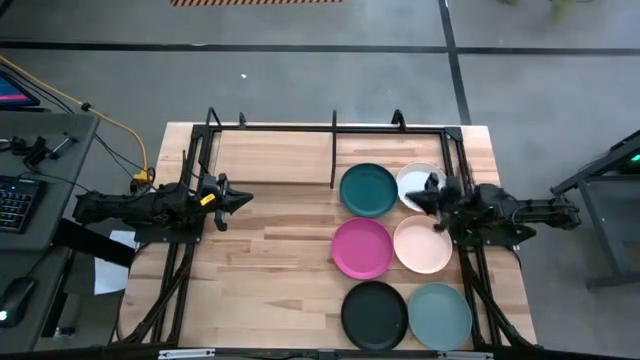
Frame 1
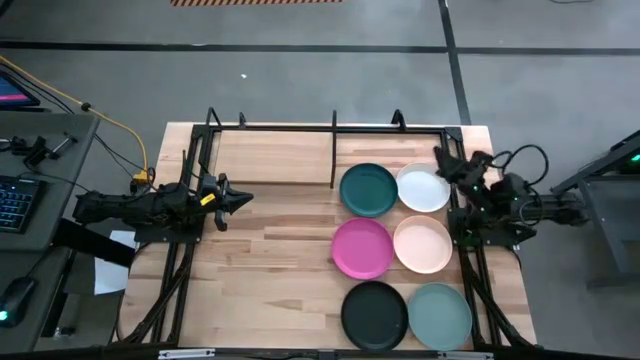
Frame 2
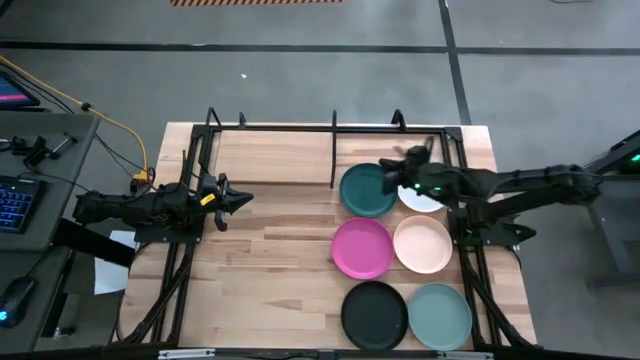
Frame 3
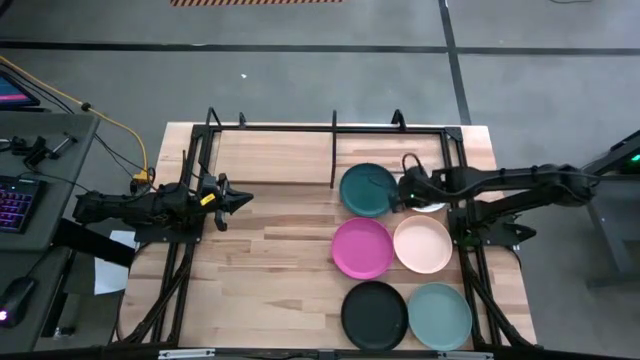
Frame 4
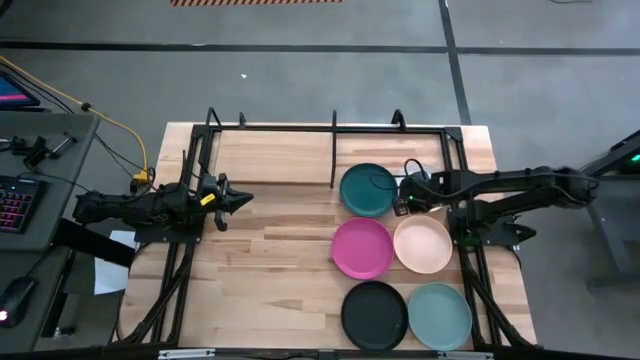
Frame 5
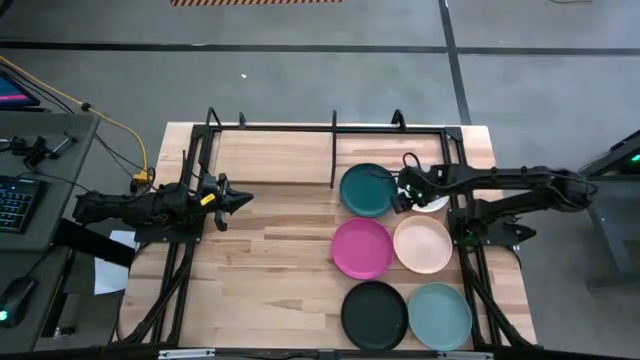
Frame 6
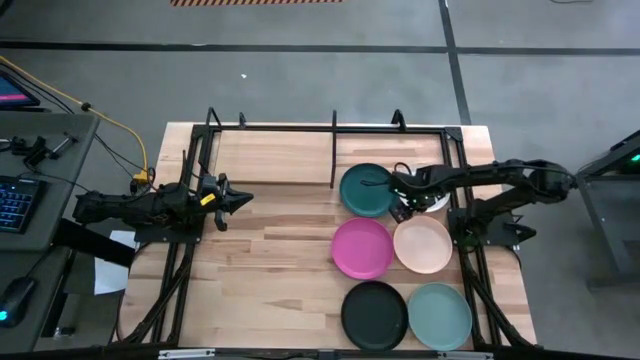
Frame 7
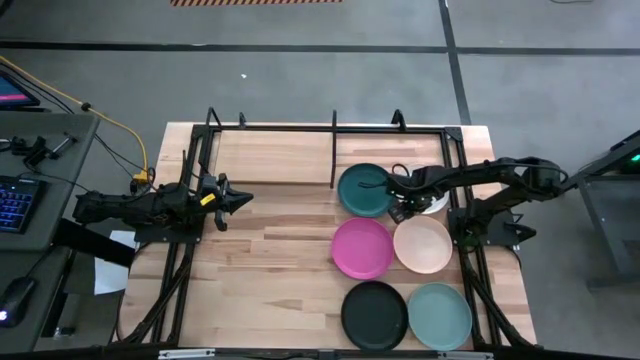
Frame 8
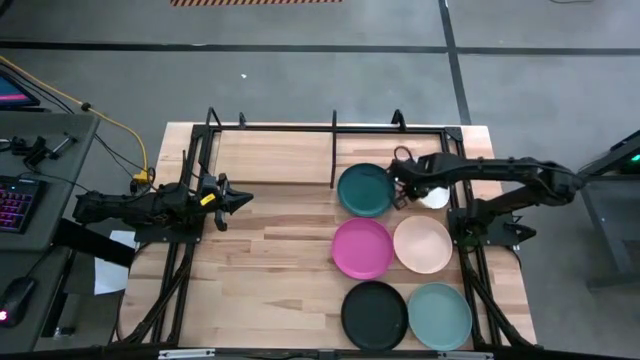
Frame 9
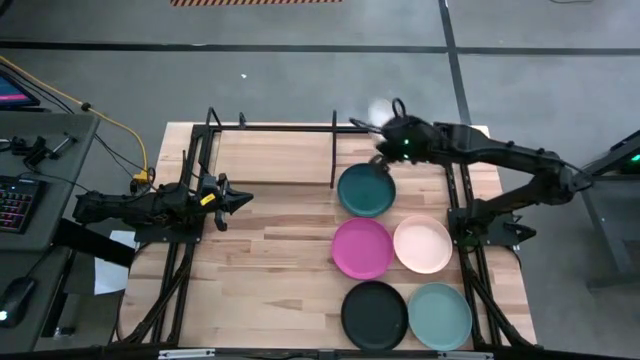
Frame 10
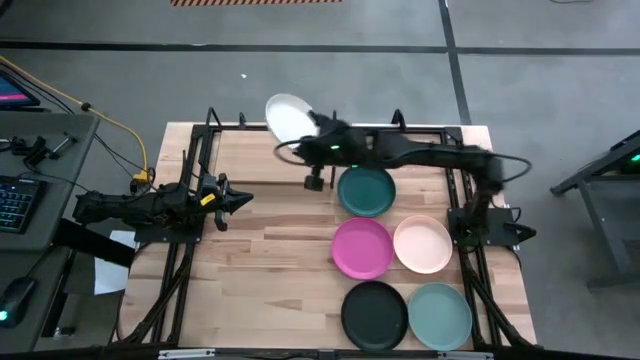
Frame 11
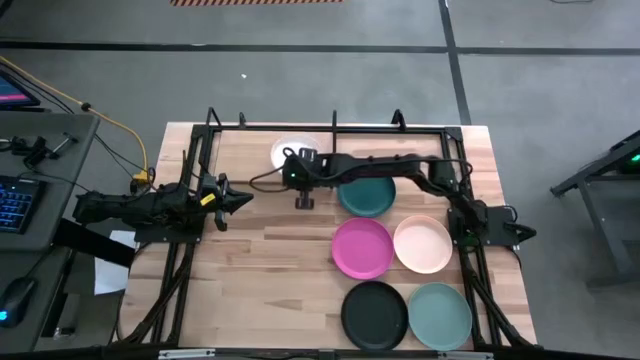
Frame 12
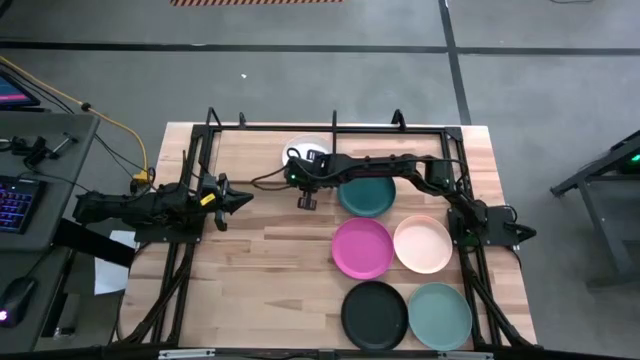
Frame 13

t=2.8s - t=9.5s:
Task: Place and stack plates onto a shelf
Put the white plate on the shelf

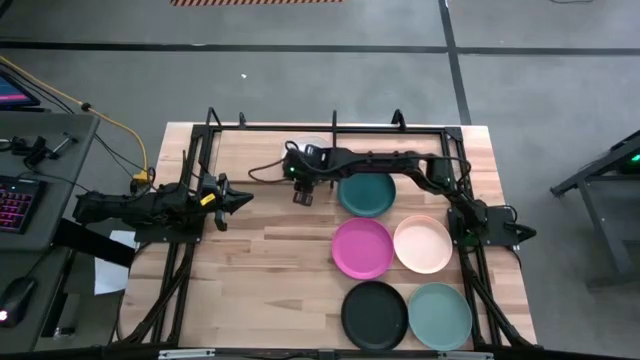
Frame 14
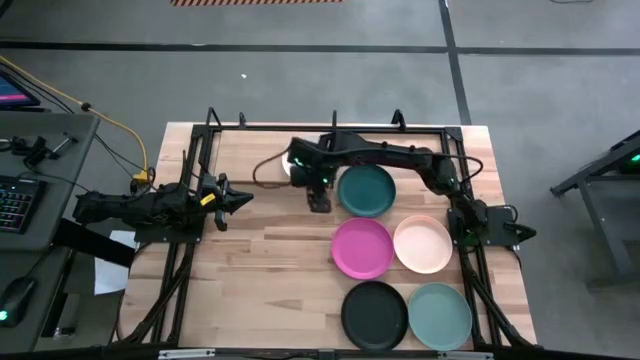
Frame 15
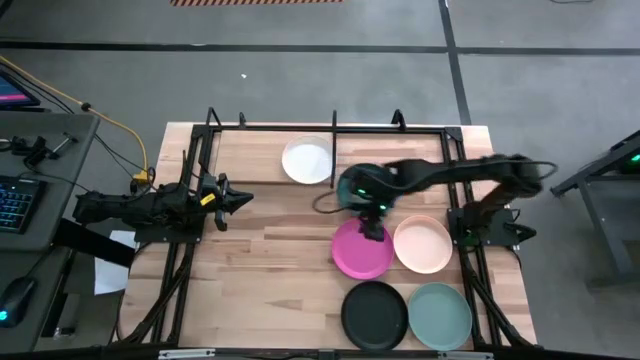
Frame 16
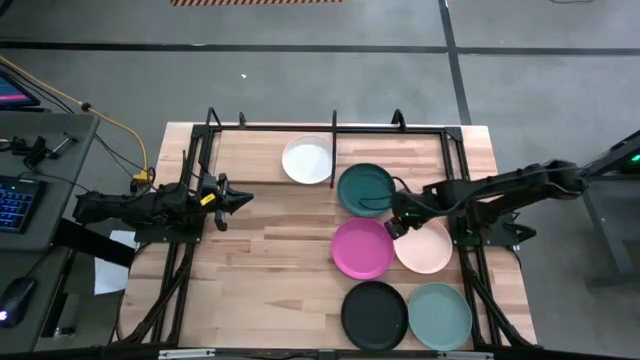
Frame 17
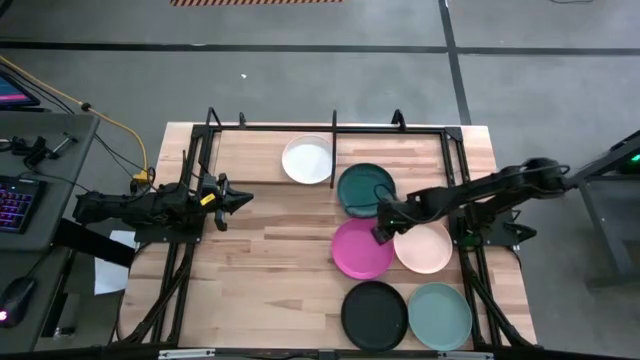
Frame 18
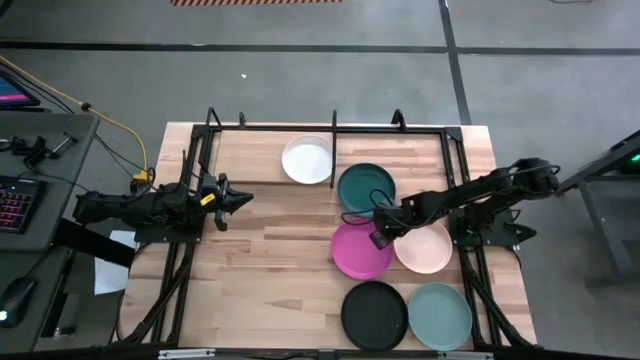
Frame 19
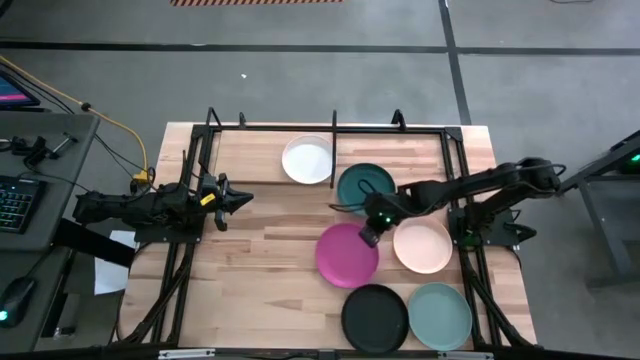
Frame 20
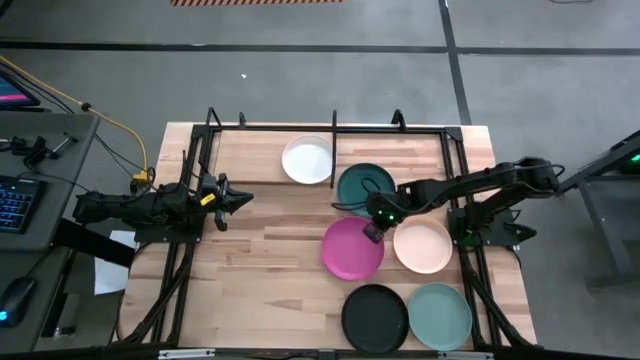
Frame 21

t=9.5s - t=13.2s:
Put the pink plate on the shelf

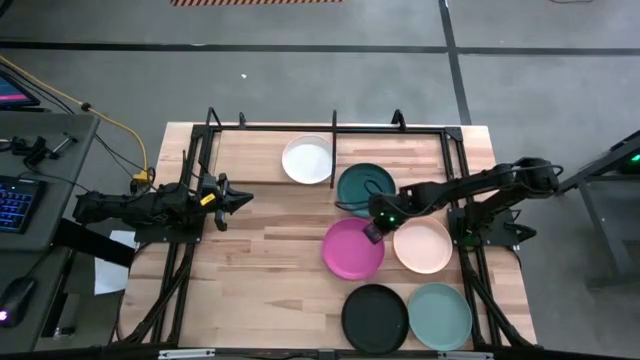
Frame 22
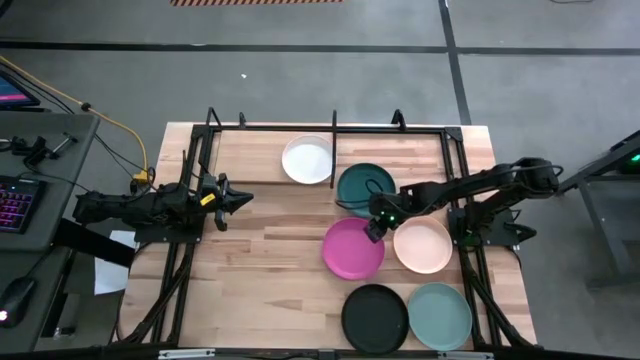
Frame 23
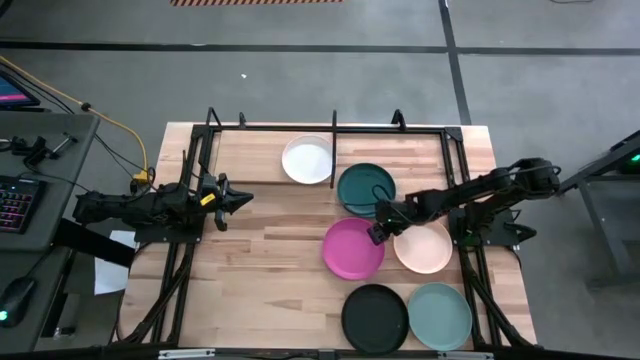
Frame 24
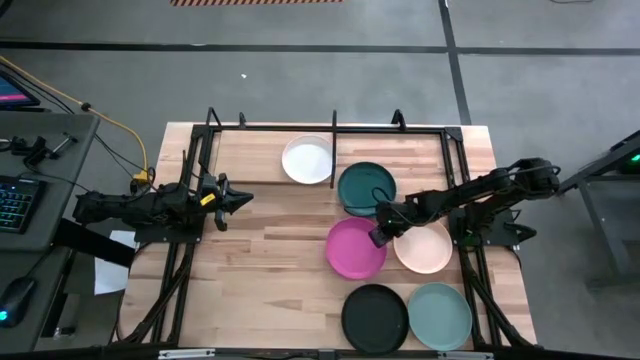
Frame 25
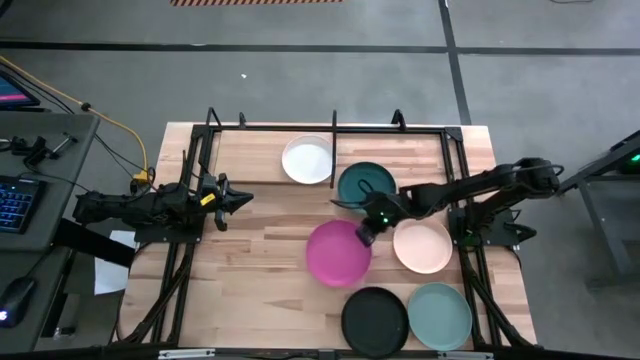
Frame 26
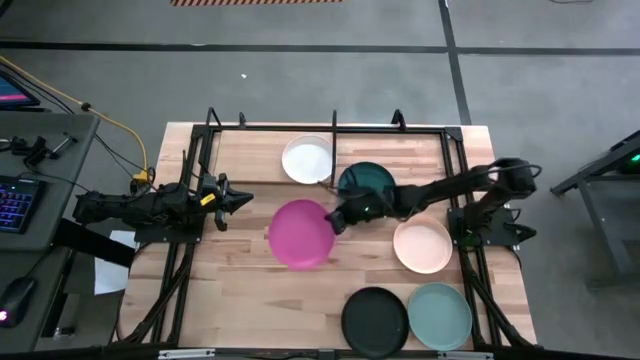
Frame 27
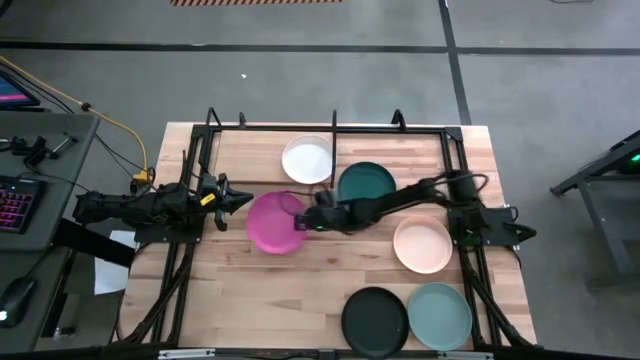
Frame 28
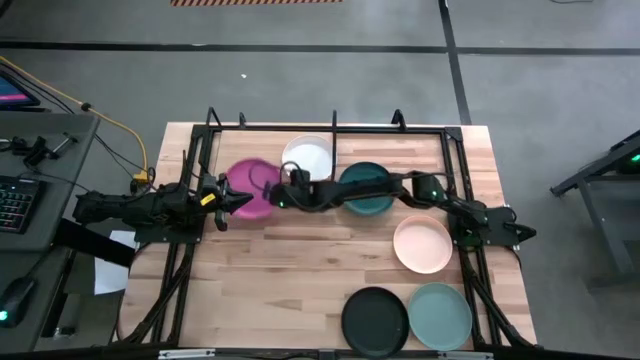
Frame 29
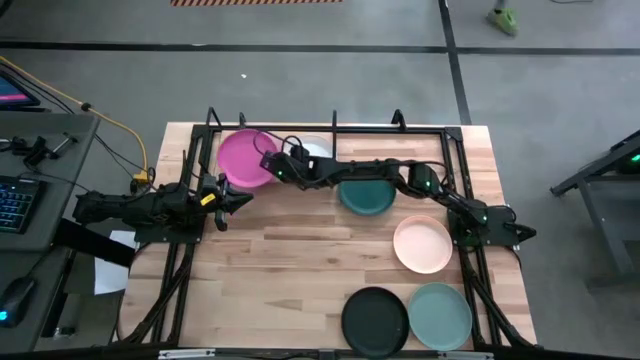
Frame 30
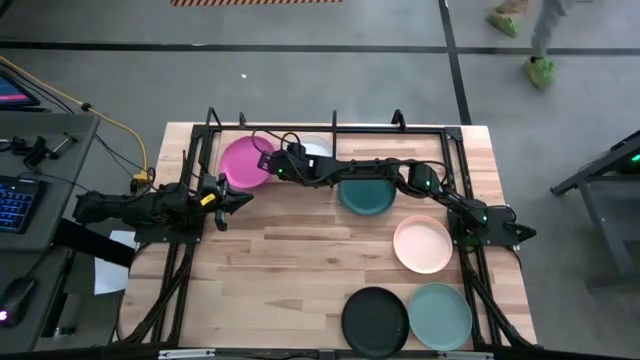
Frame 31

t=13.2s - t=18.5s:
Put the pink plate on the shelf

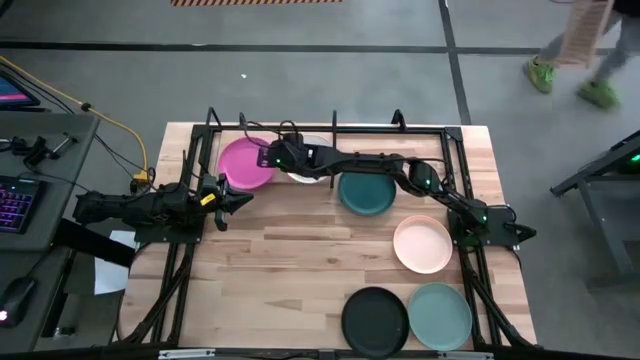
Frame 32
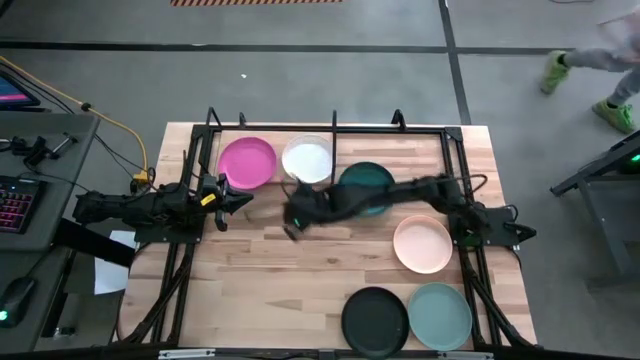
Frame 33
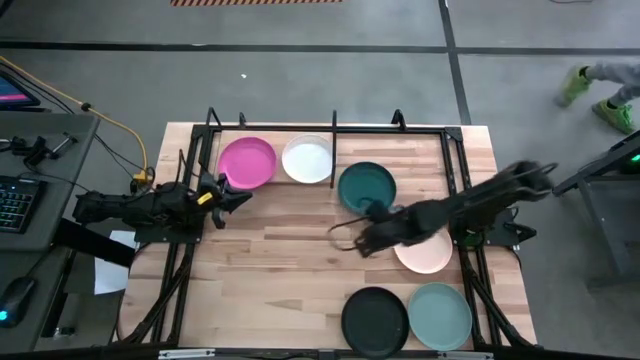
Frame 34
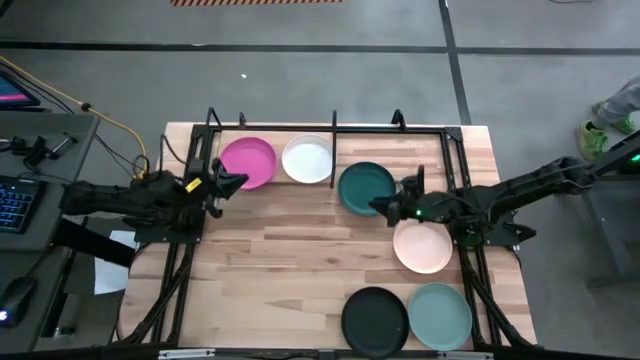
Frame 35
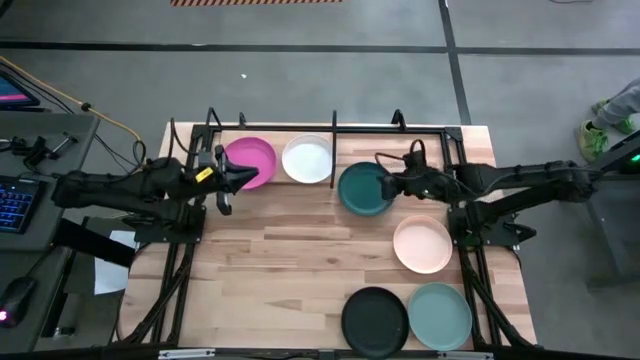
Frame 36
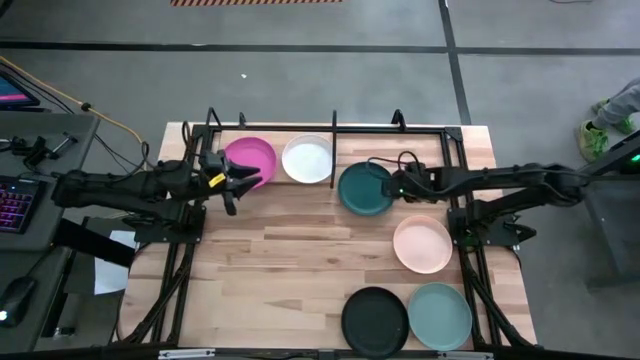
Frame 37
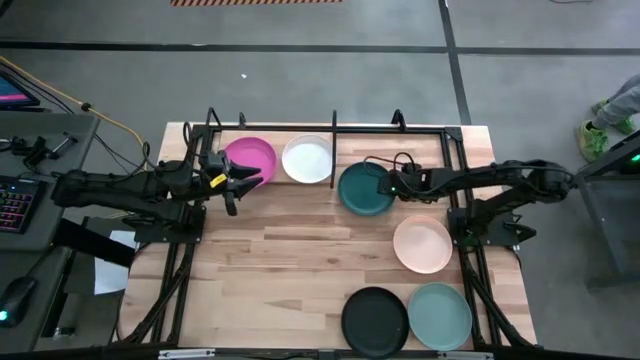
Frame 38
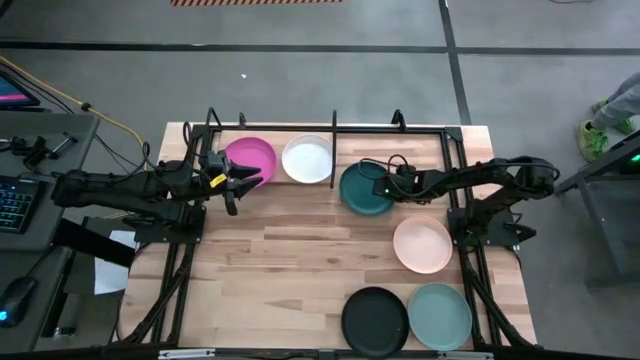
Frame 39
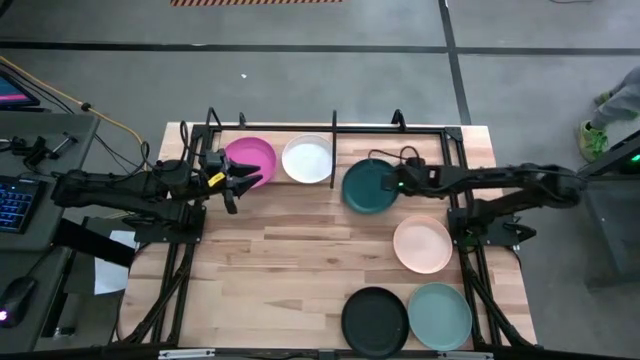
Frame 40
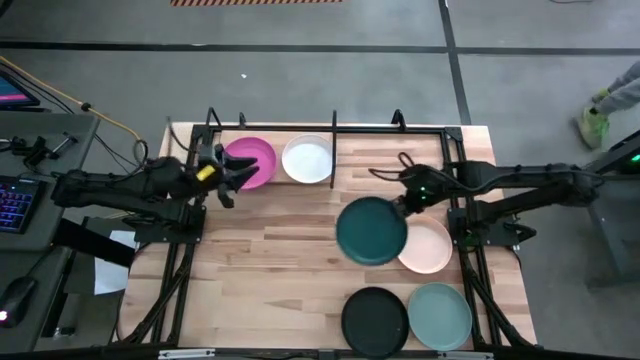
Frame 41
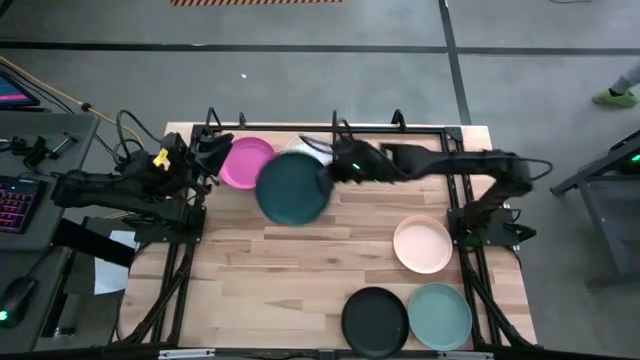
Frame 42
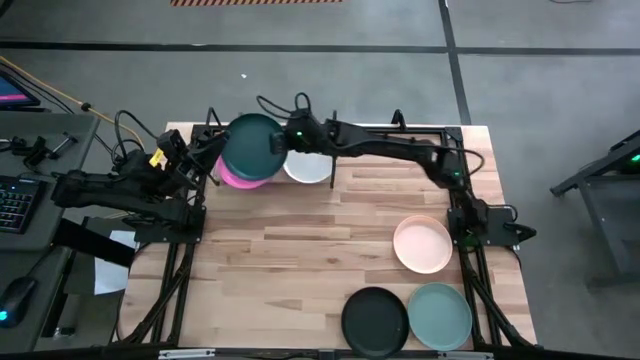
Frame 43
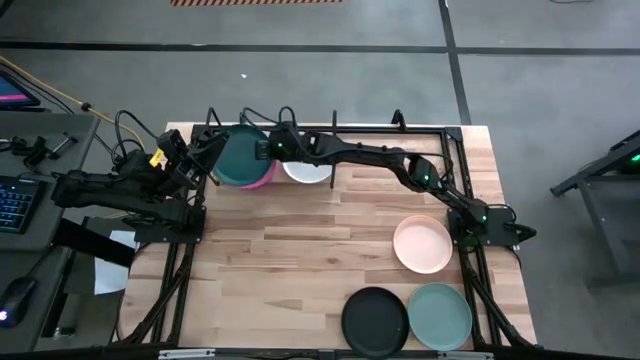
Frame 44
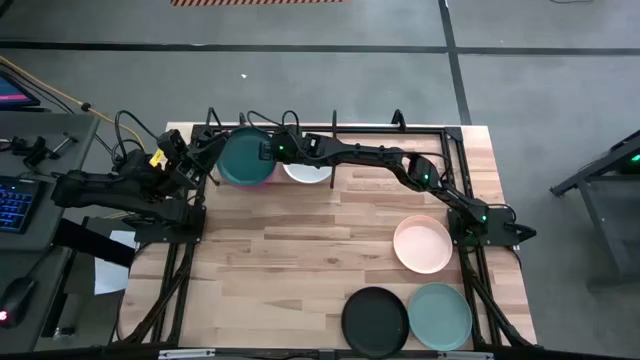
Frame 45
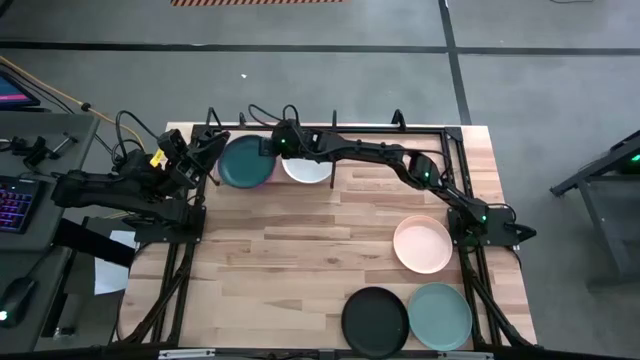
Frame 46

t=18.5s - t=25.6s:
Stack the dark green plate on top of the pink plate on the shelf
